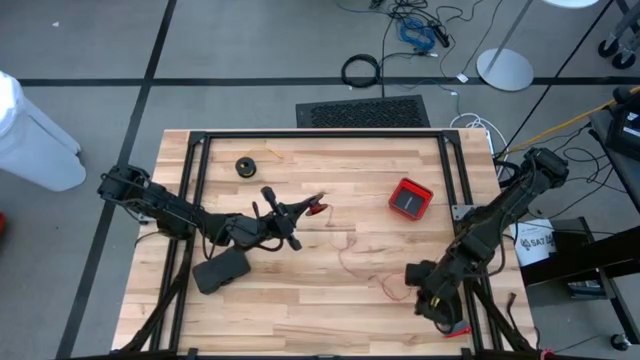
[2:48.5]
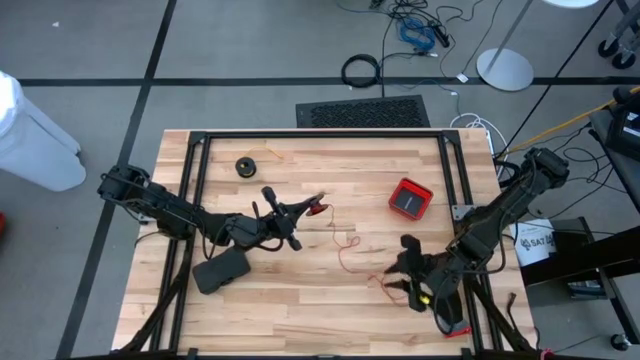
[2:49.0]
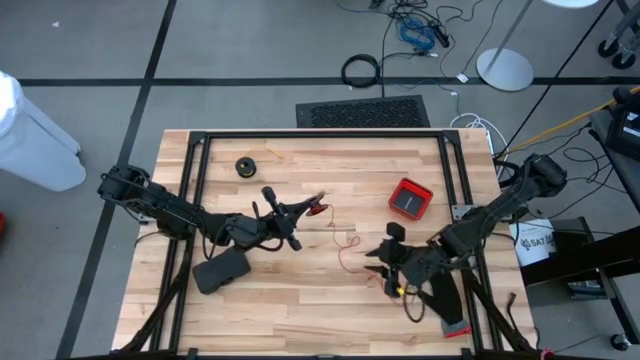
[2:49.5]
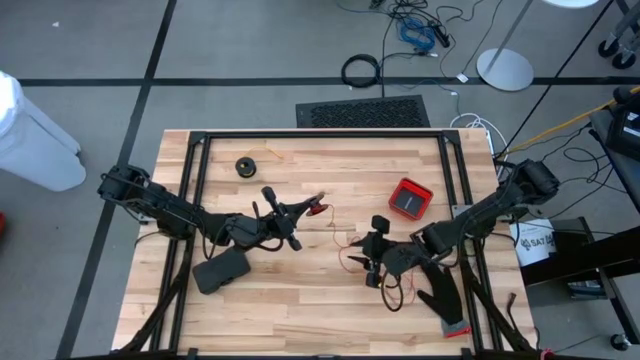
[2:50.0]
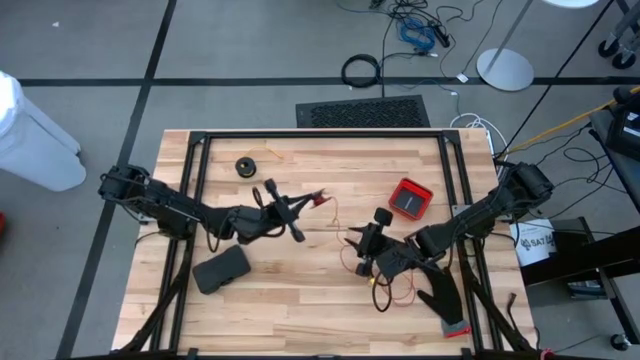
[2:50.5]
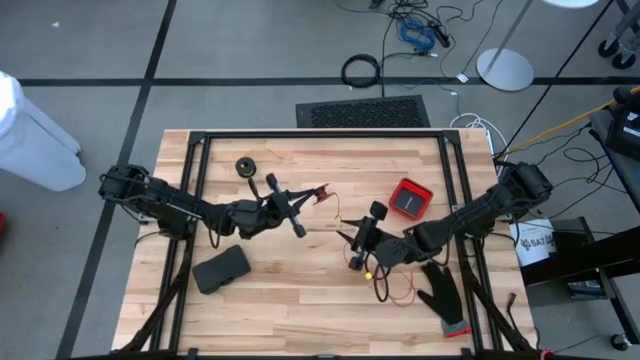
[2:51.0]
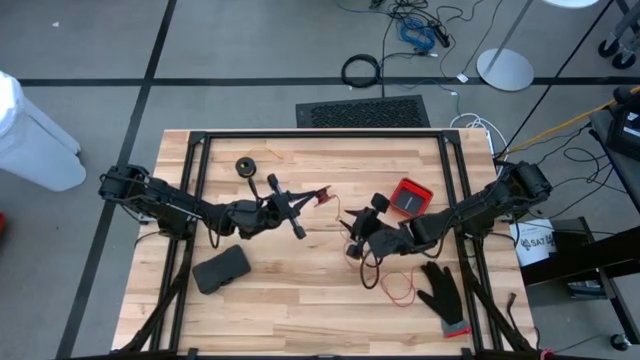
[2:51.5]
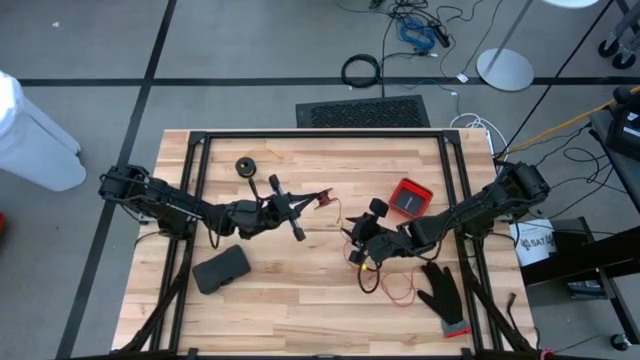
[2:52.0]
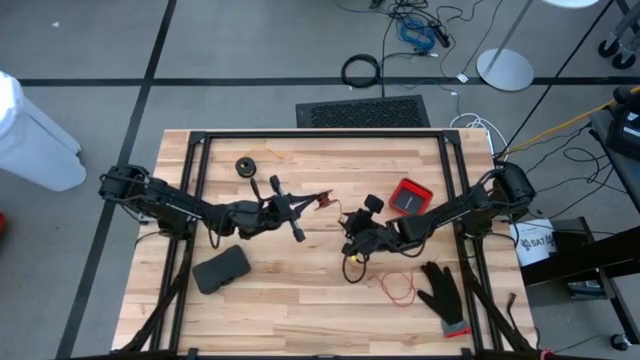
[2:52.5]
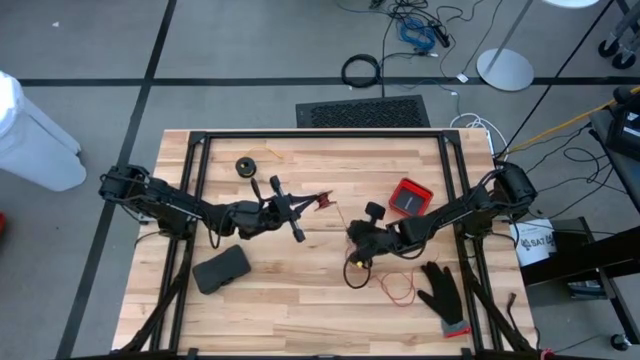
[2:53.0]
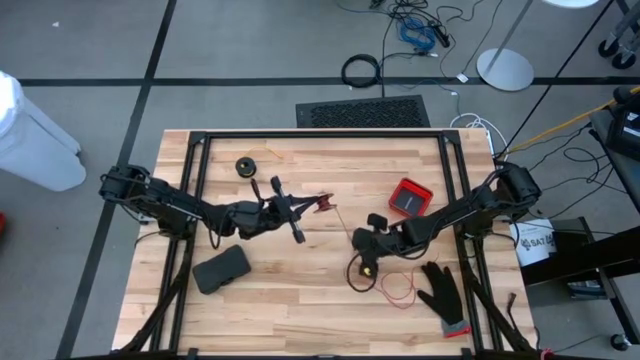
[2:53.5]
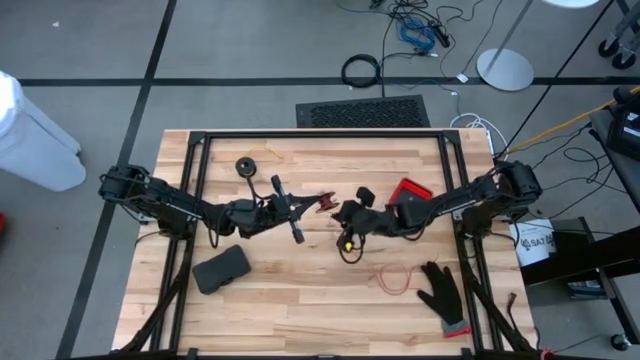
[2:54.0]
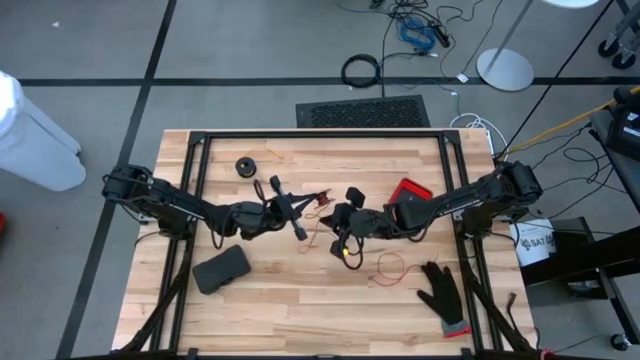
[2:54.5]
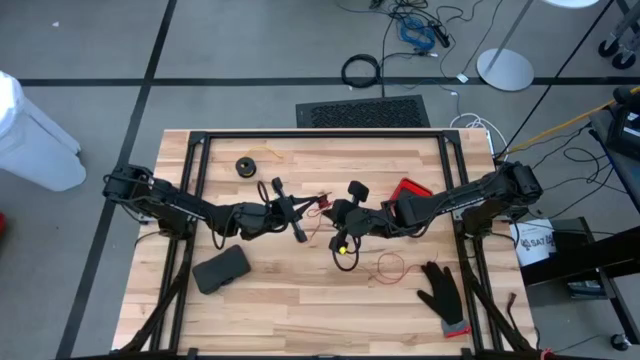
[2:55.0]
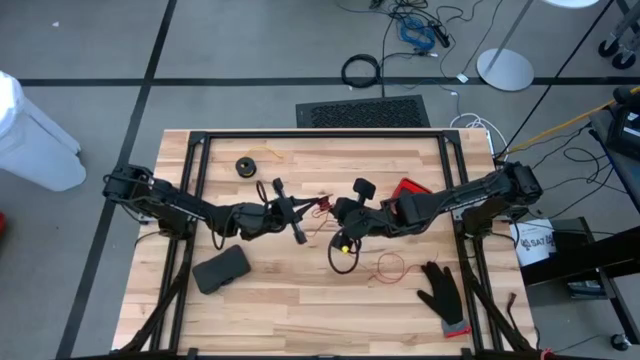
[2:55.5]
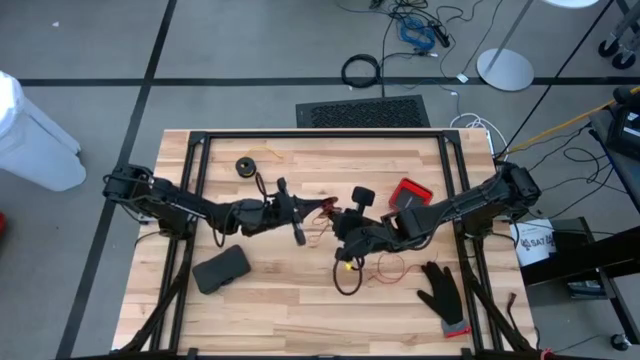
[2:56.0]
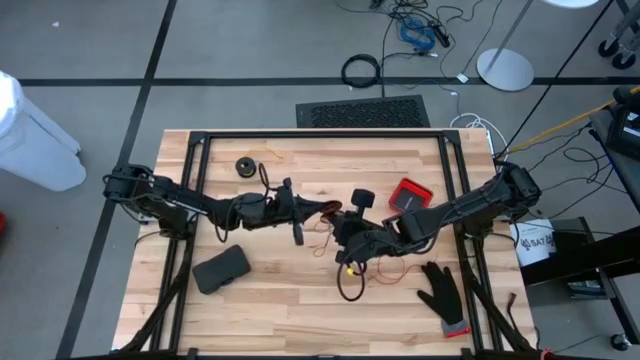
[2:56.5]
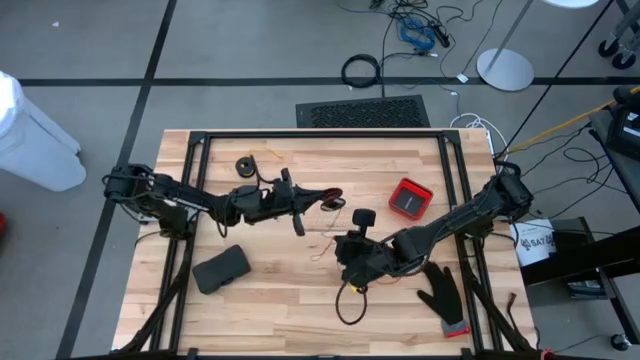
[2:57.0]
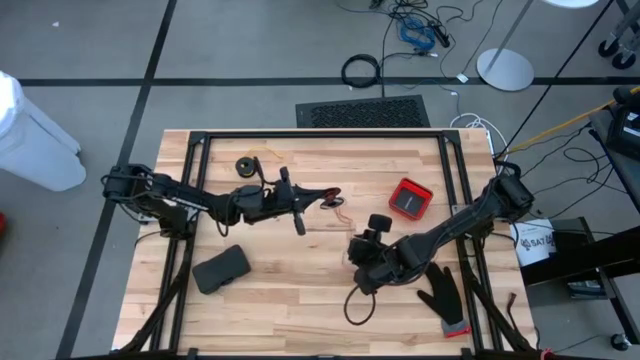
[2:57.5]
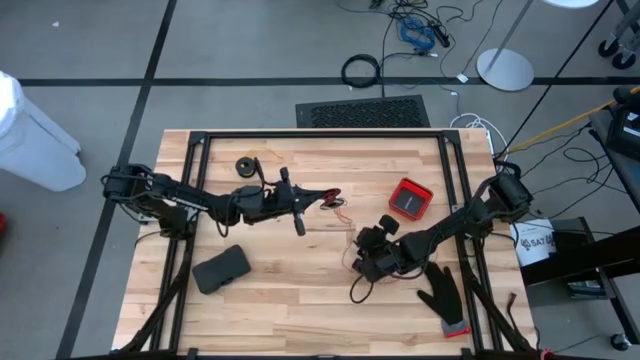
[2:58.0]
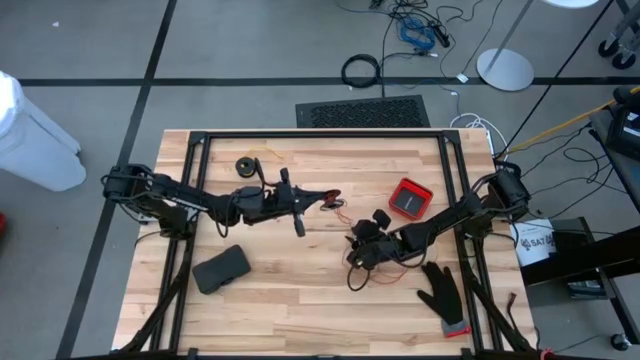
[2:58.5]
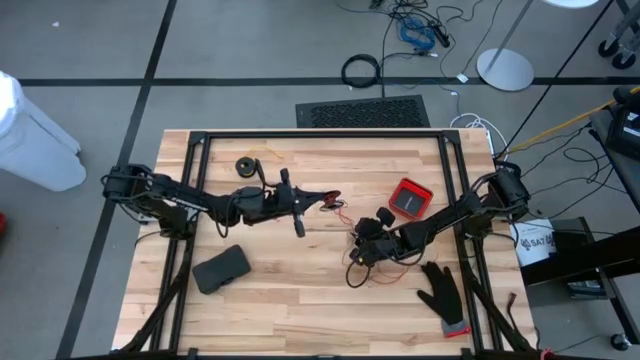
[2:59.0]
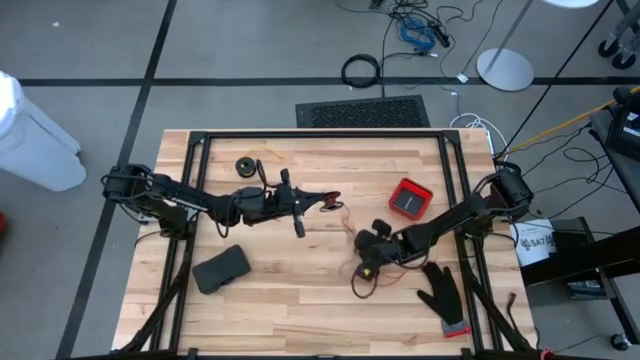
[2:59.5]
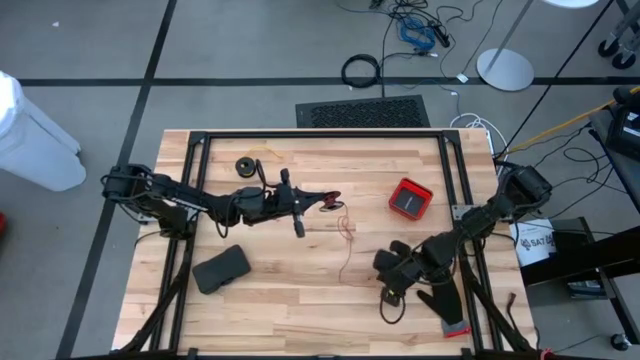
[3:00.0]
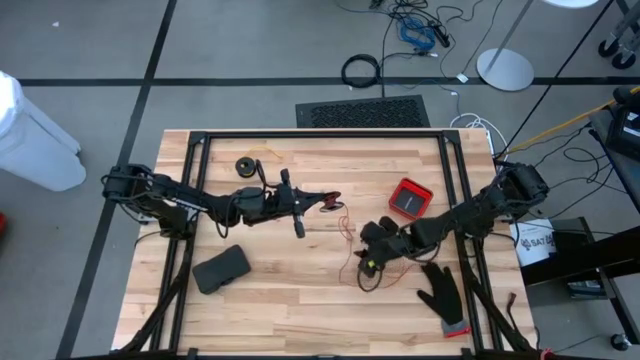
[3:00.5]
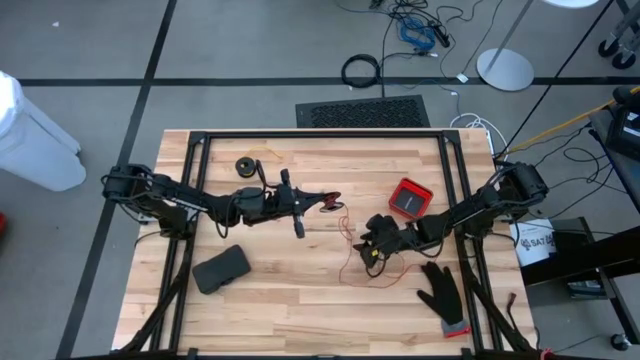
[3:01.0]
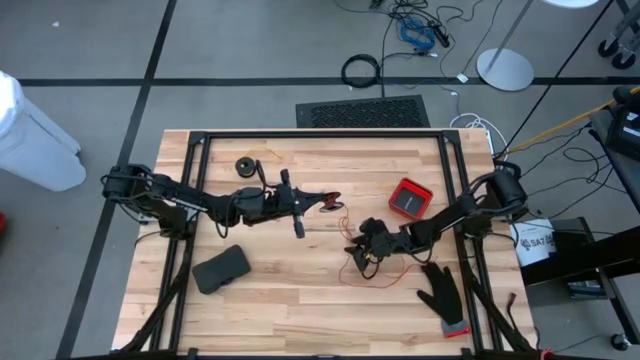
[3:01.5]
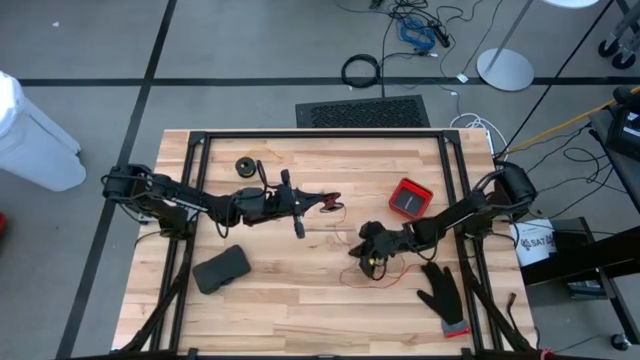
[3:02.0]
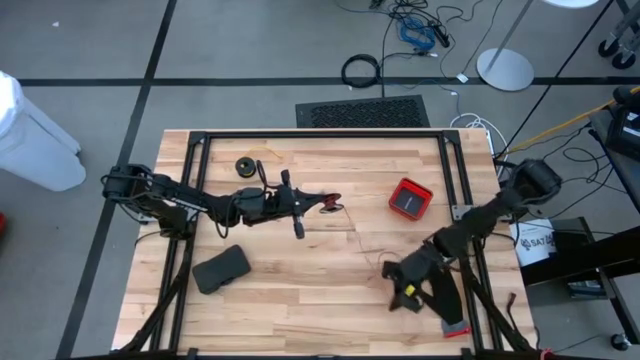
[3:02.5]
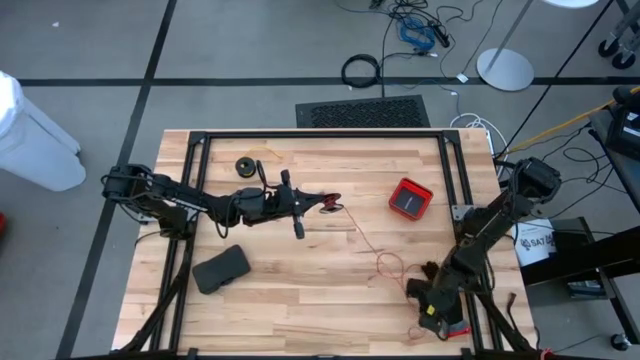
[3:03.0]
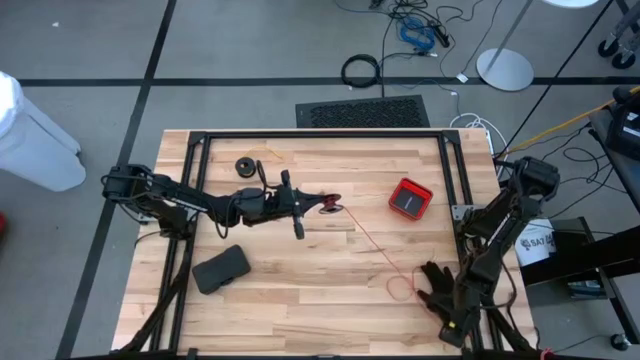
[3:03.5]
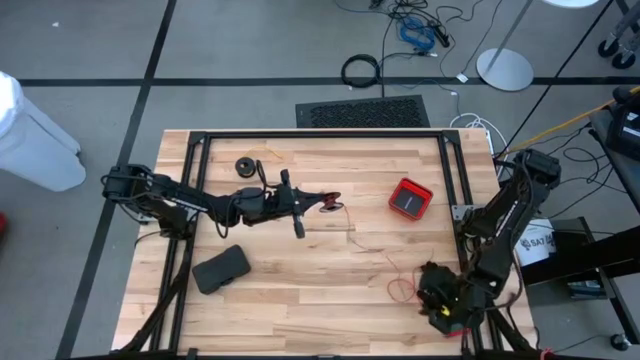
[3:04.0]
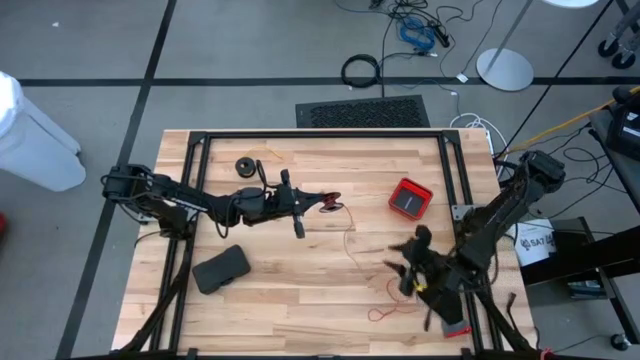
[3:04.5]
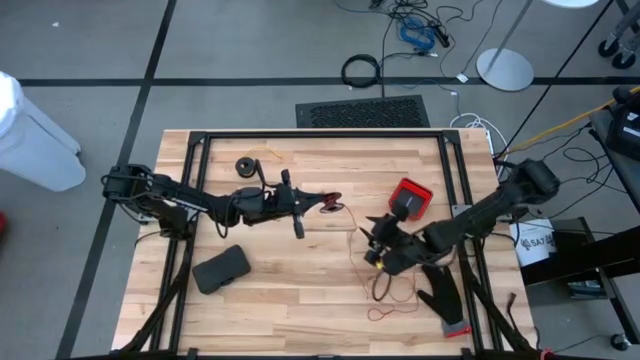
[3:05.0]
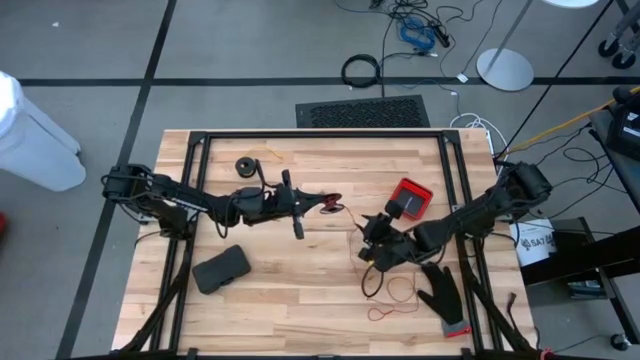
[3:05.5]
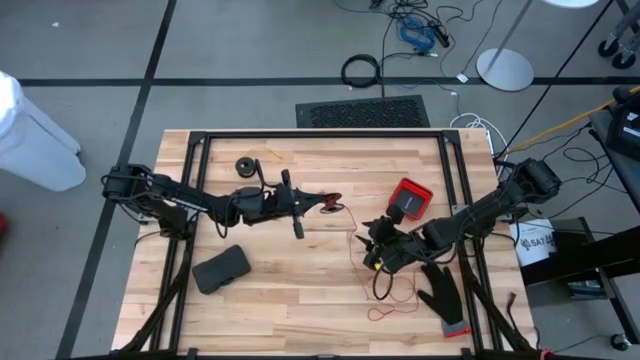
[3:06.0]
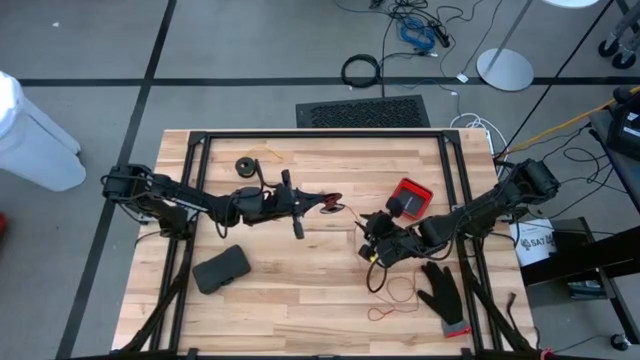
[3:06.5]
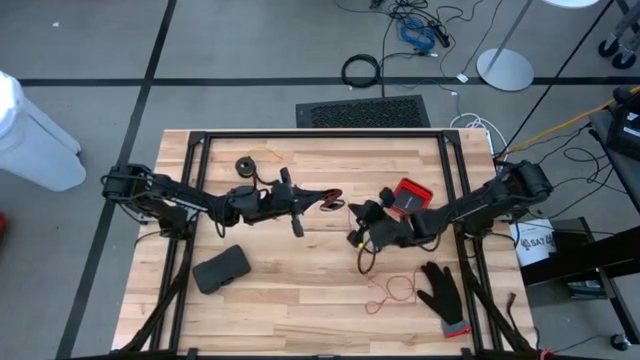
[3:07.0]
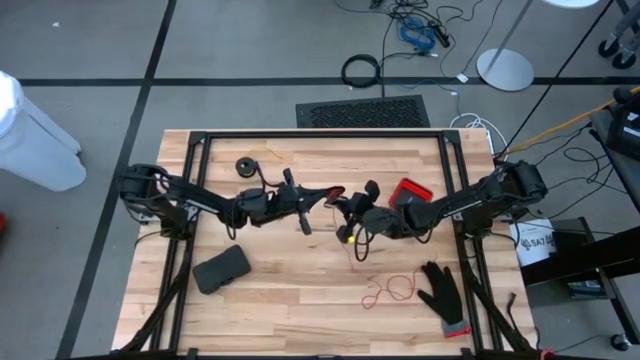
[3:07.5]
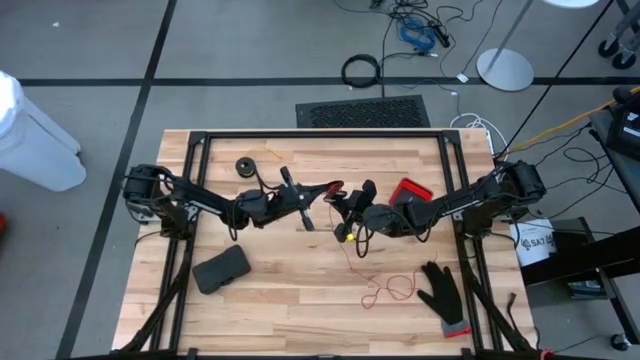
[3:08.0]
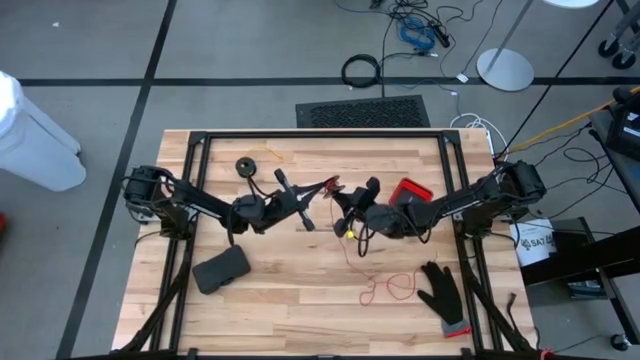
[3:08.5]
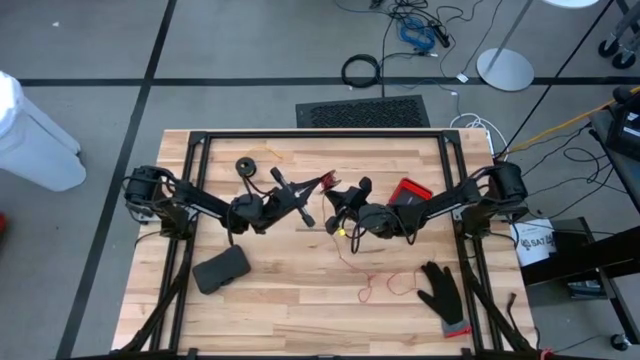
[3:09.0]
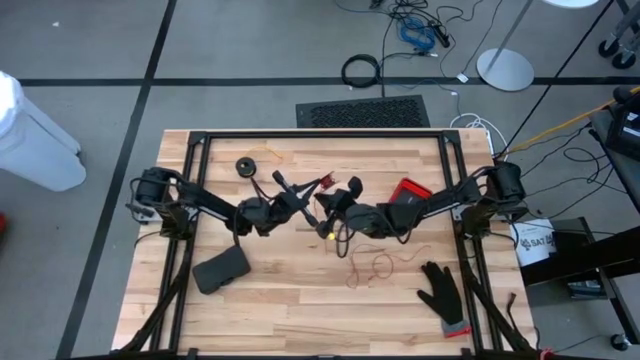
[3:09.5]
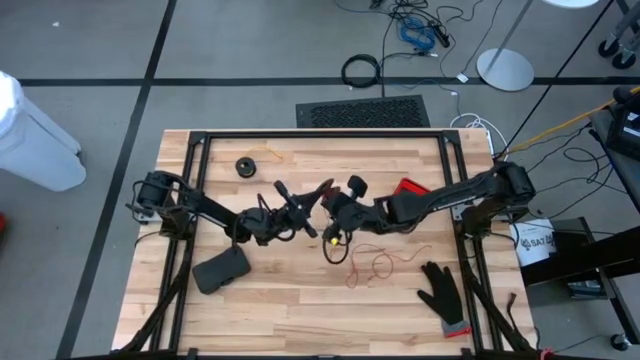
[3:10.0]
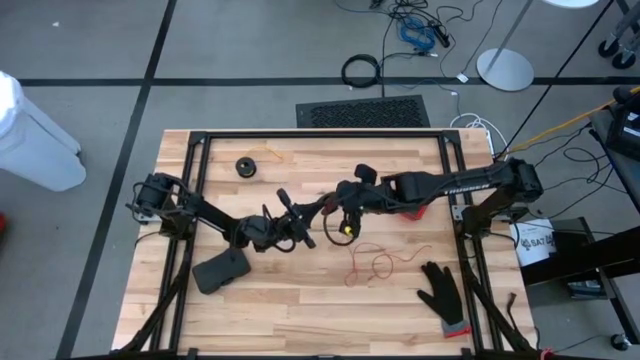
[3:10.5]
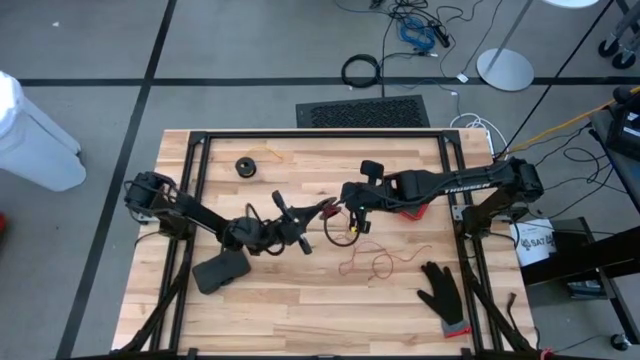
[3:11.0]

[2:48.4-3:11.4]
Task: Coil cords
Coil the red wire onto the black spool
